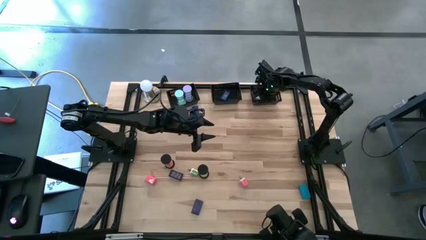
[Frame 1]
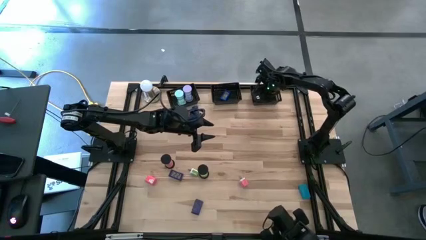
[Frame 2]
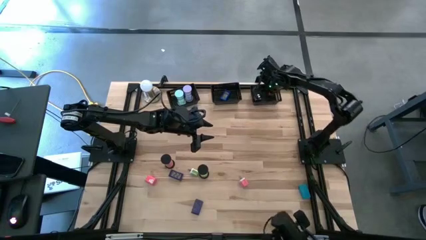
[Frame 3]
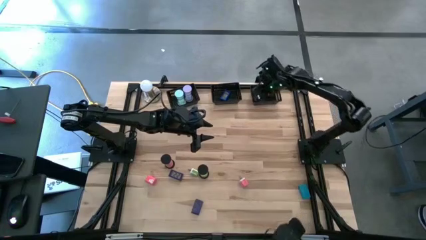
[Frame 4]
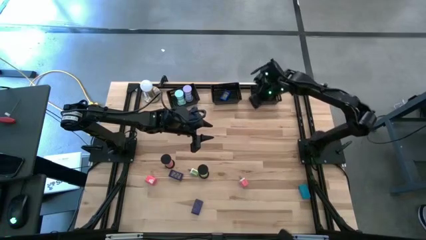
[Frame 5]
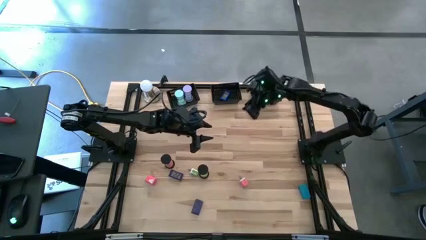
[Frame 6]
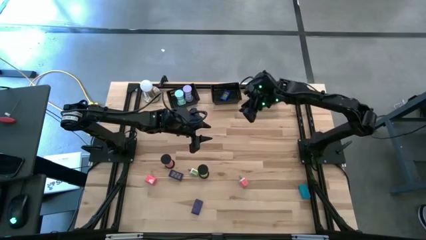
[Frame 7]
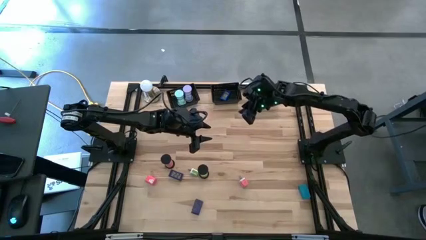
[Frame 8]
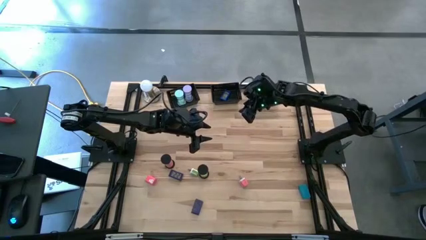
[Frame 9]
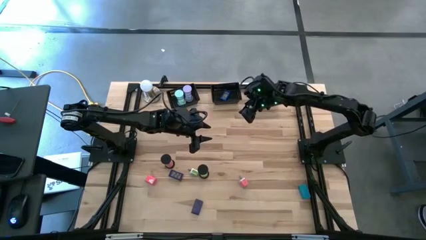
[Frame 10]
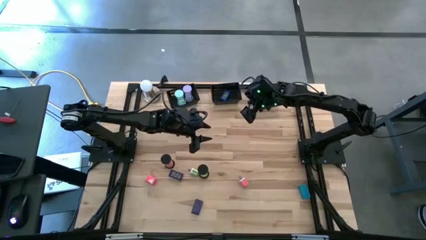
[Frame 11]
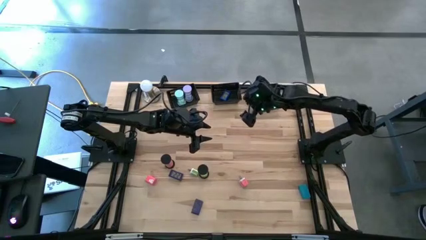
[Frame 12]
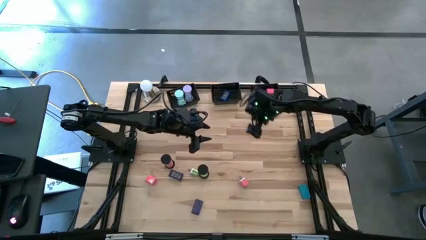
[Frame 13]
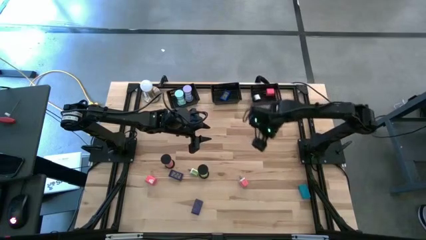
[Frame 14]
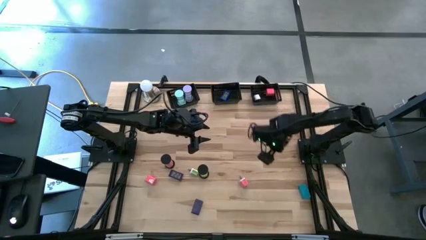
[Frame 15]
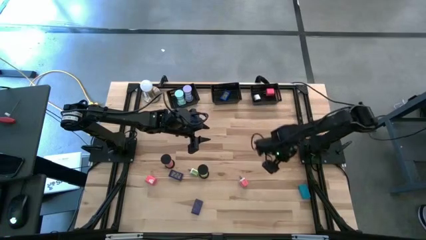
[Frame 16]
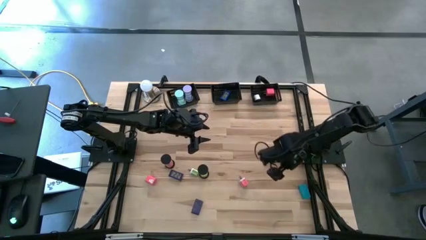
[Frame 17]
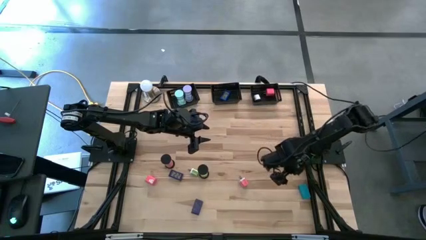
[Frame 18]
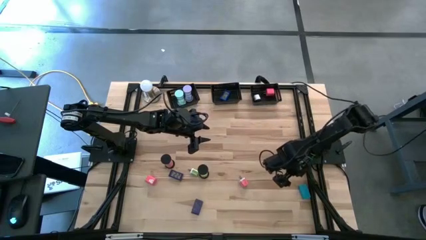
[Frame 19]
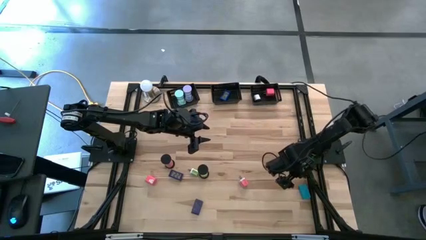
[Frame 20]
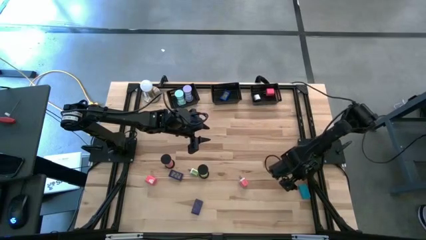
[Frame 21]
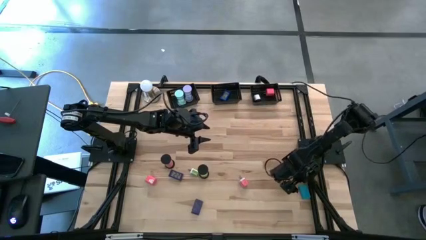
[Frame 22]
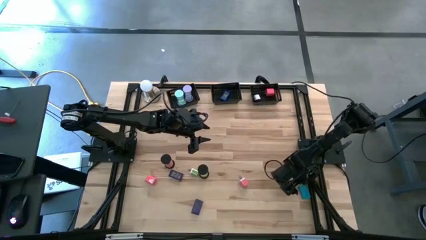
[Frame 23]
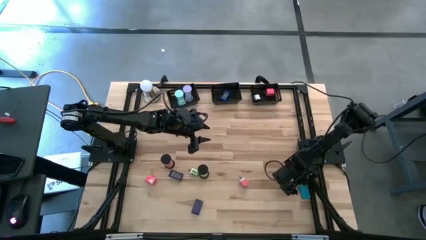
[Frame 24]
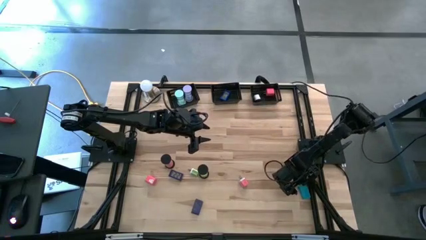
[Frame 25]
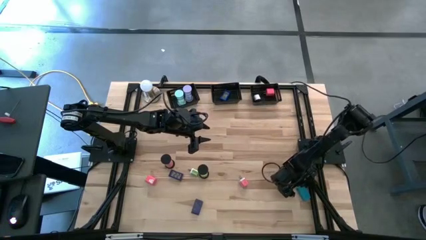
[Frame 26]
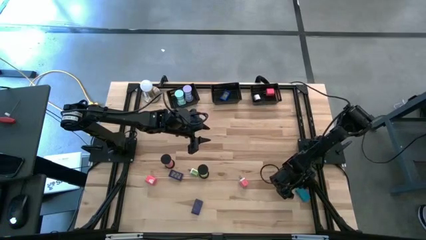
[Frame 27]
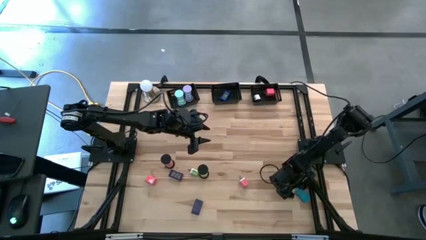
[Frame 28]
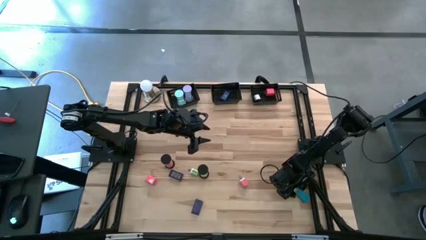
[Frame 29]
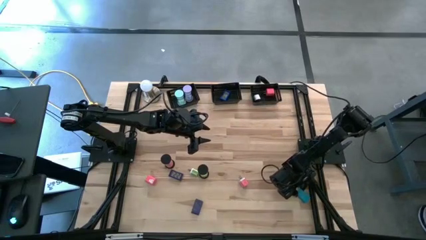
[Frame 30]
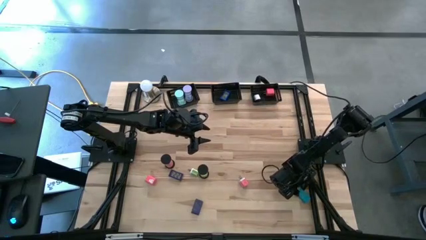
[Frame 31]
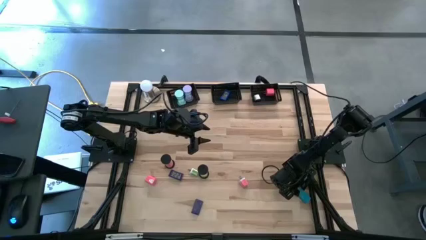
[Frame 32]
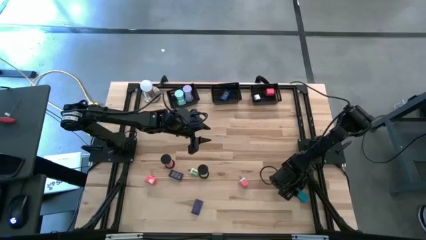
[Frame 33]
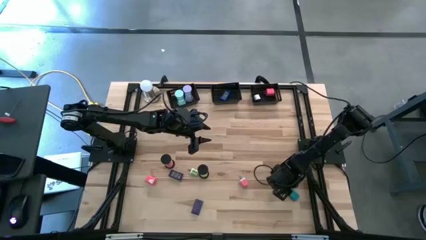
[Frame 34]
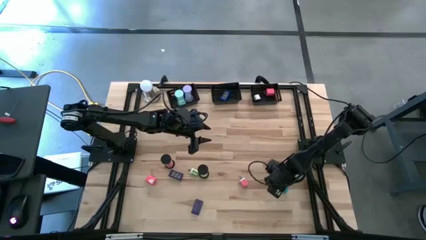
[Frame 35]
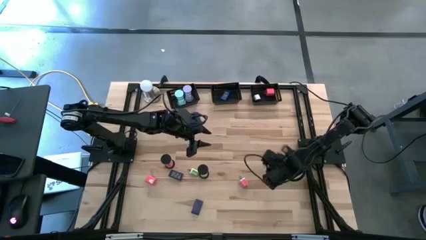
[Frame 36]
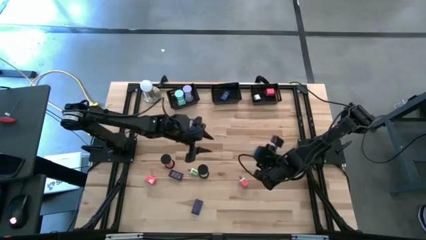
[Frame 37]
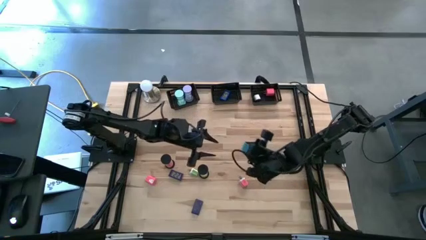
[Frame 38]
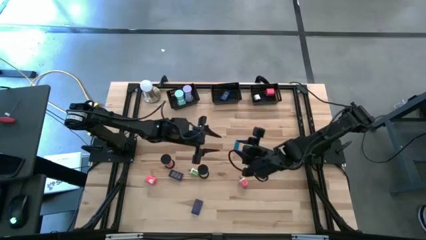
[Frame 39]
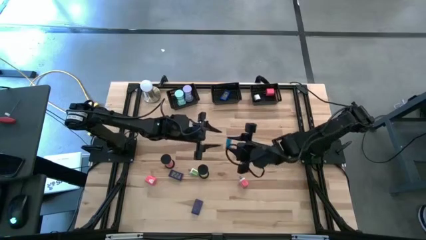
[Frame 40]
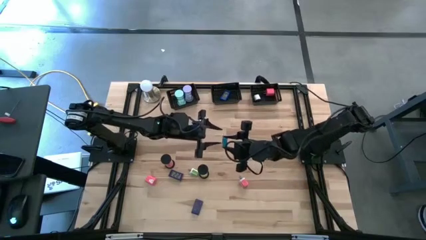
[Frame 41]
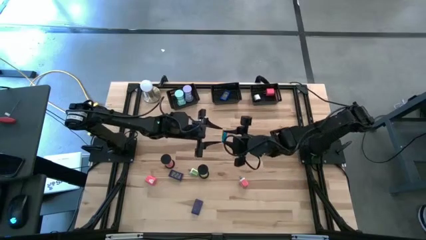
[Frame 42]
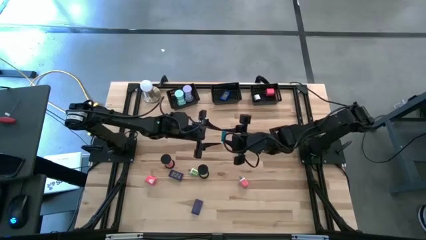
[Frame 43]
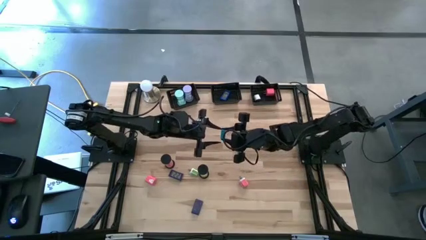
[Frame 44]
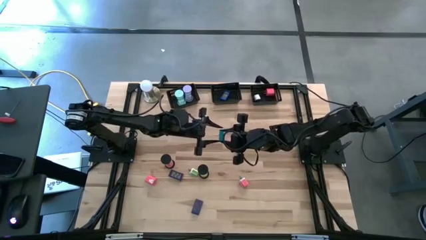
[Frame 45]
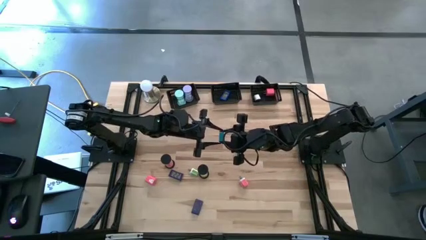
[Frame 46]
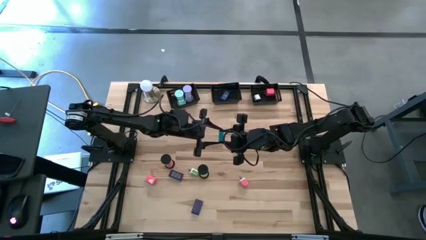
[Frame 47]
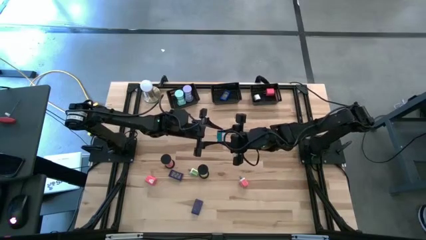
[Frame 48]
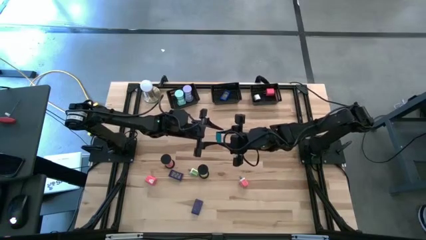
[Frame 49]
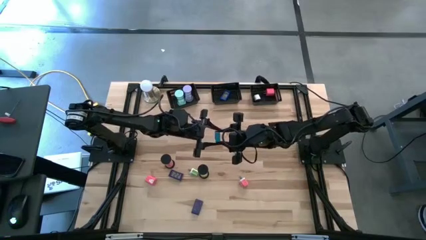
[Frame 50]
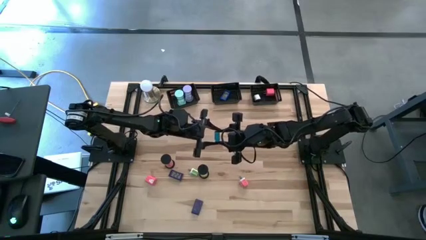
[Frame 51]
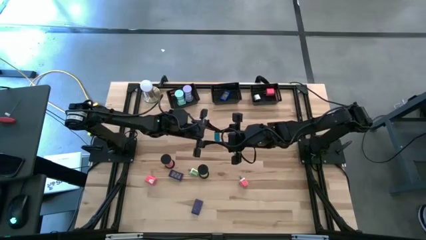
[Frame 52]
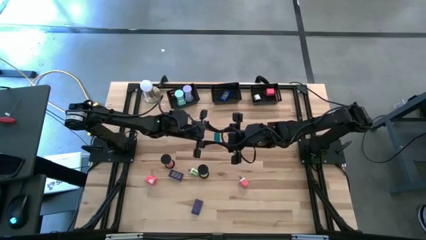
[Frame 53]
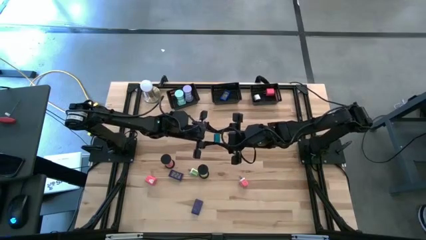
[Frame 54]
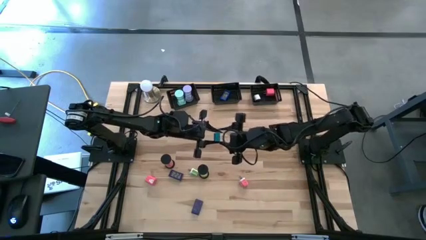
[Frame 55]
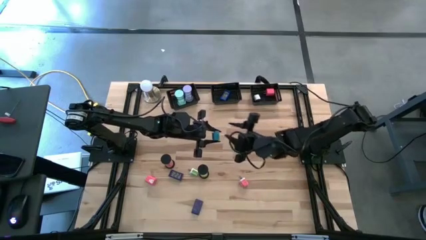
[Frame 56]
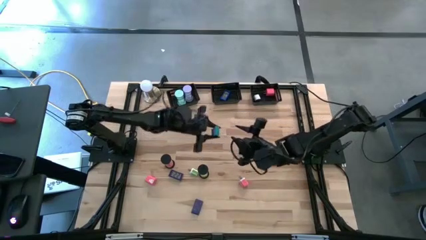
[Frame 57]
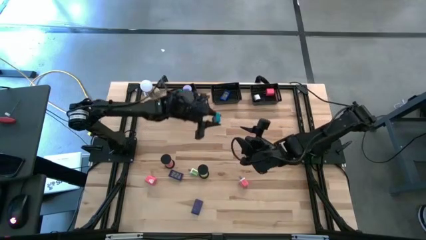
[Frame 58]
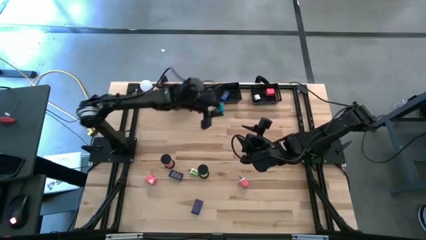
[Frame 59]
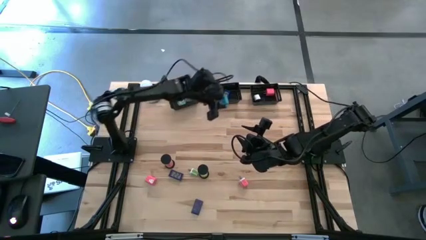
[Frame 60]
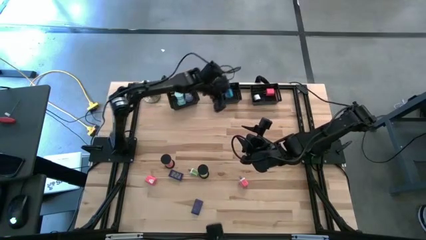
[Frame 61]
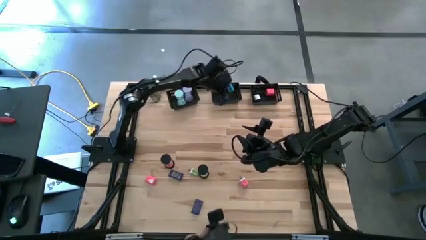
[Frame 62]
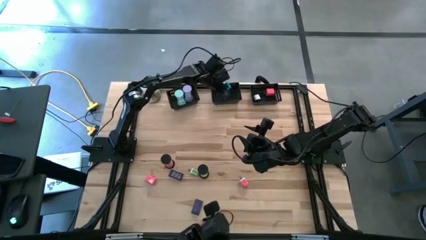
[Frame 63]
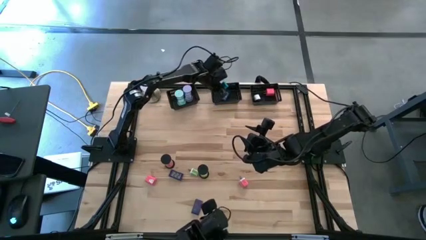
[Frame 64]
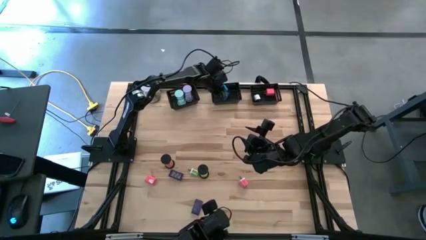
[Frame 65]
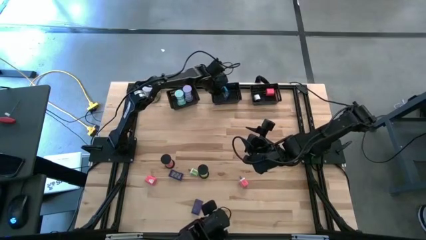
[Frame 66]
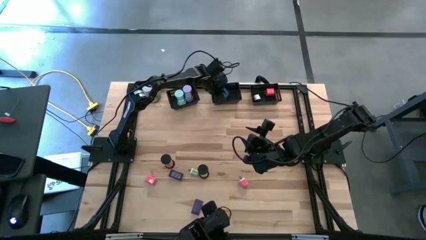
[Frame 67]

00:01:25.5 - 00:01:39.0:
Task: Pick & Place Office items
Put the light blue digital clock into the middle black bin
